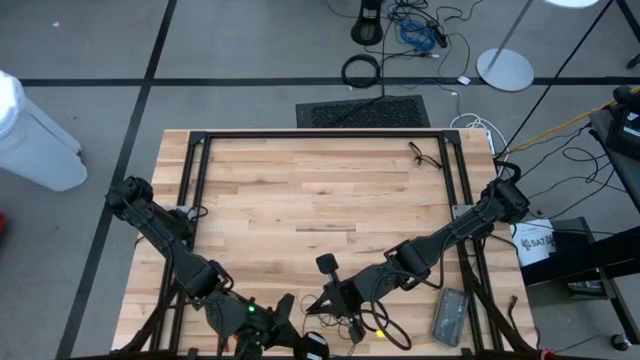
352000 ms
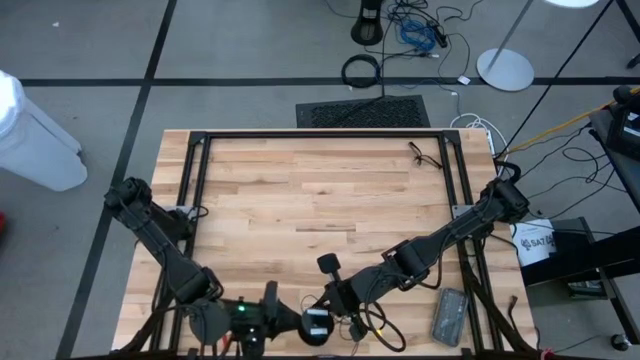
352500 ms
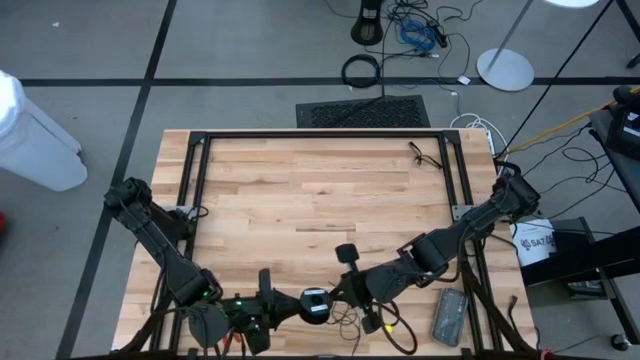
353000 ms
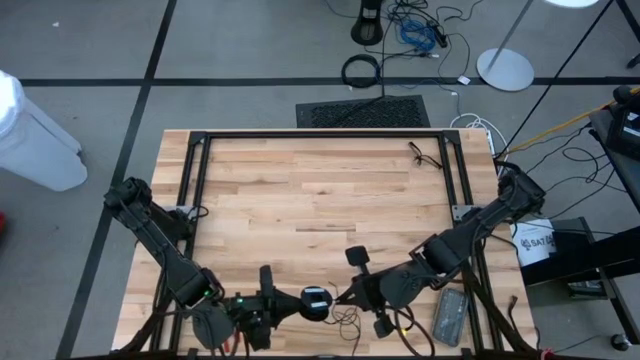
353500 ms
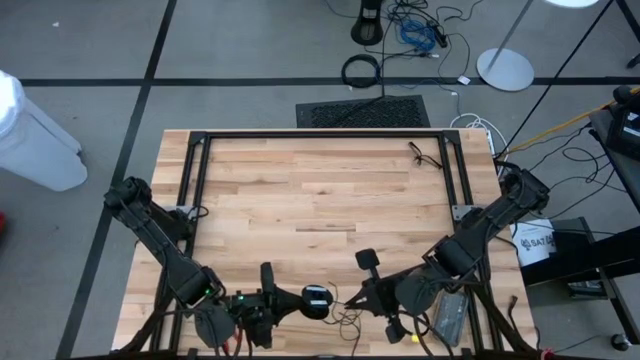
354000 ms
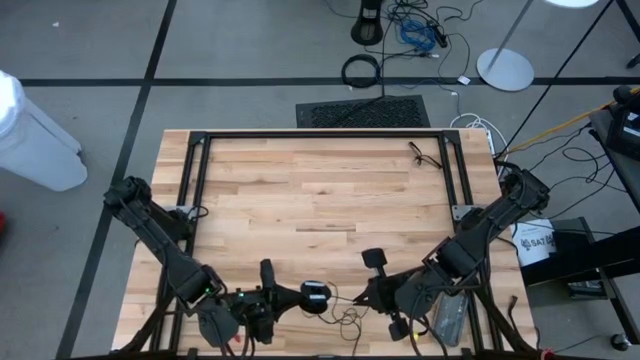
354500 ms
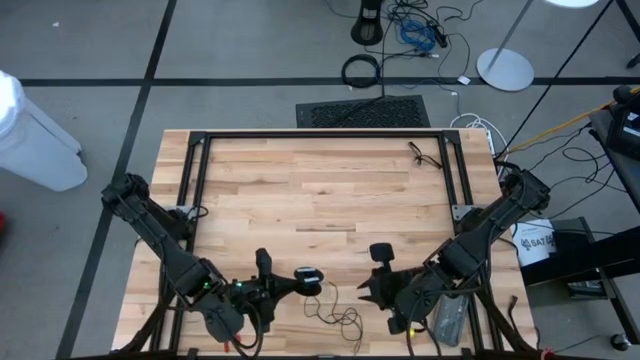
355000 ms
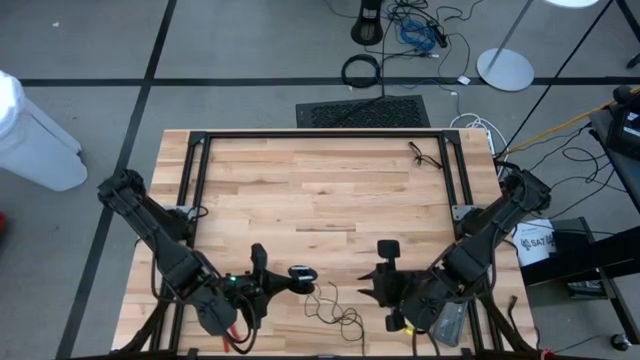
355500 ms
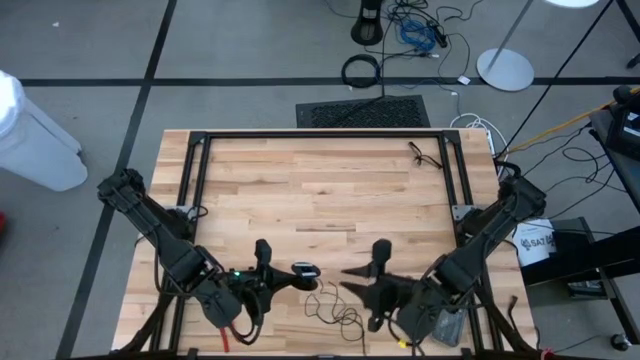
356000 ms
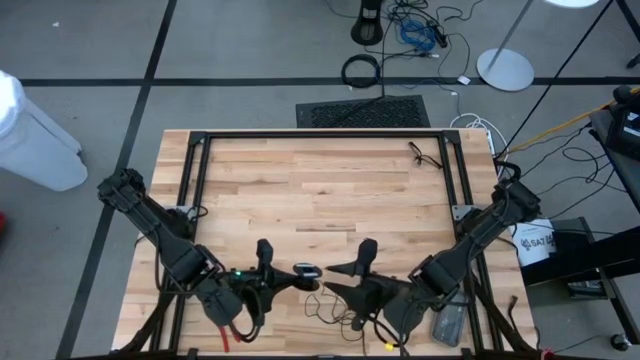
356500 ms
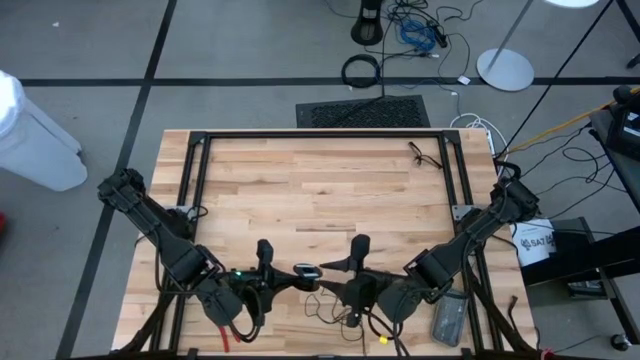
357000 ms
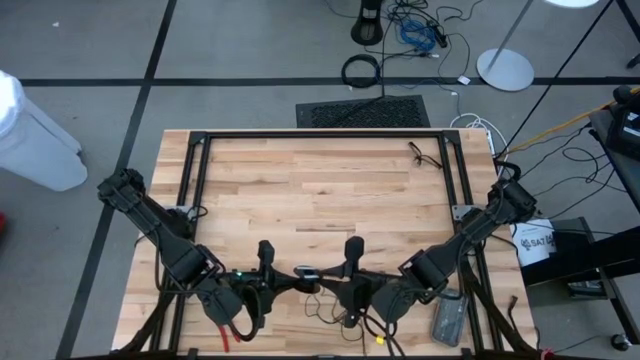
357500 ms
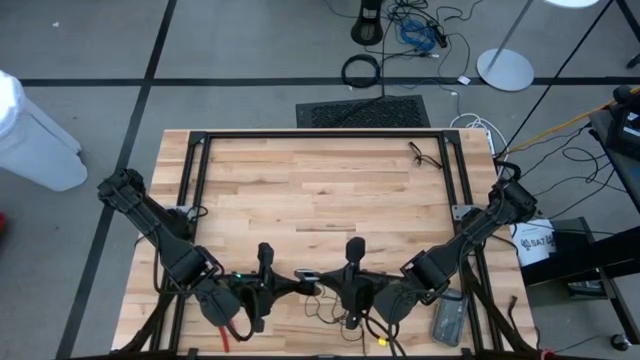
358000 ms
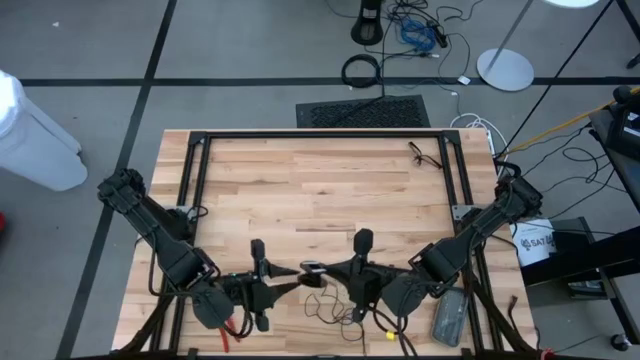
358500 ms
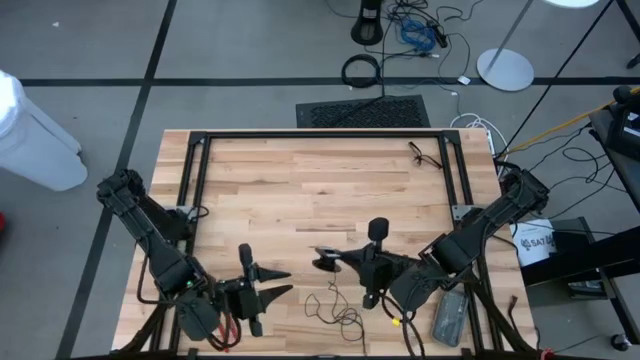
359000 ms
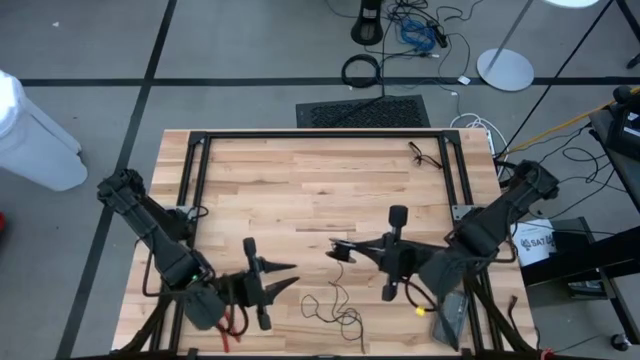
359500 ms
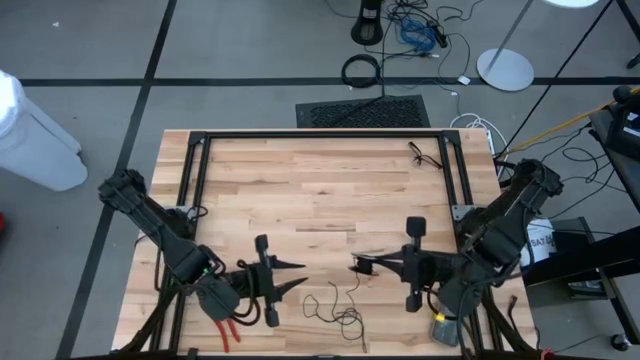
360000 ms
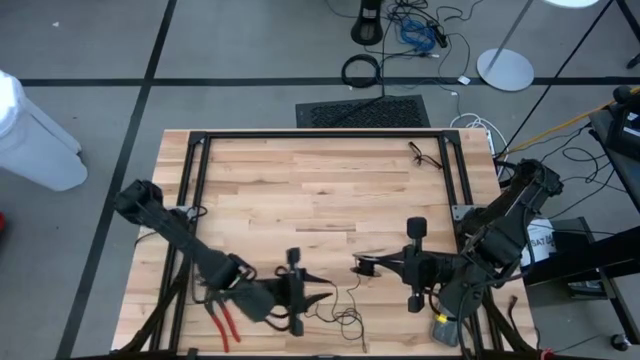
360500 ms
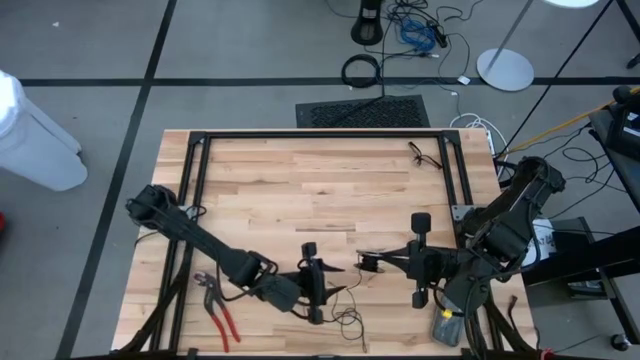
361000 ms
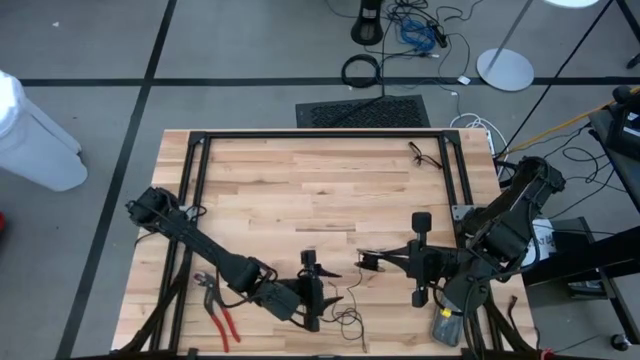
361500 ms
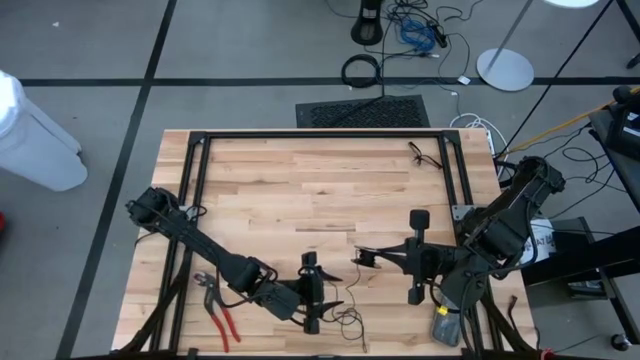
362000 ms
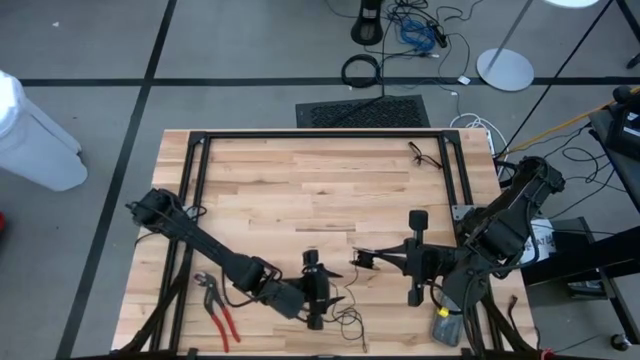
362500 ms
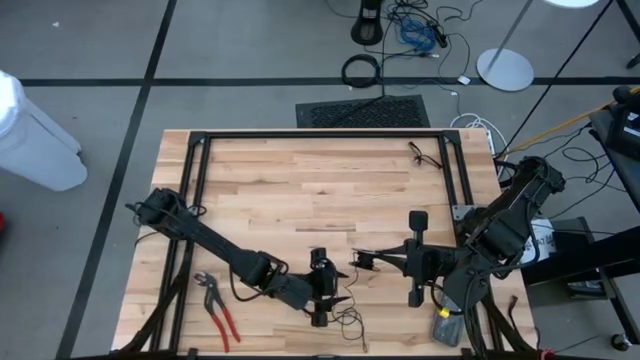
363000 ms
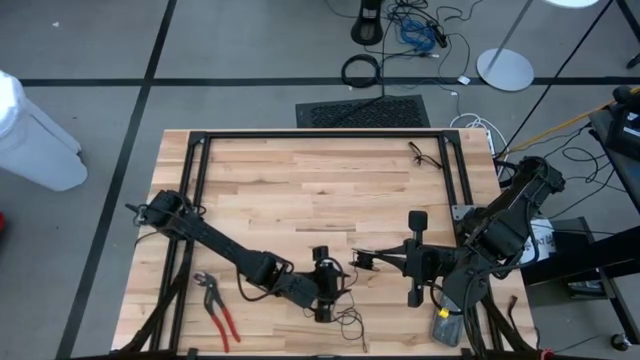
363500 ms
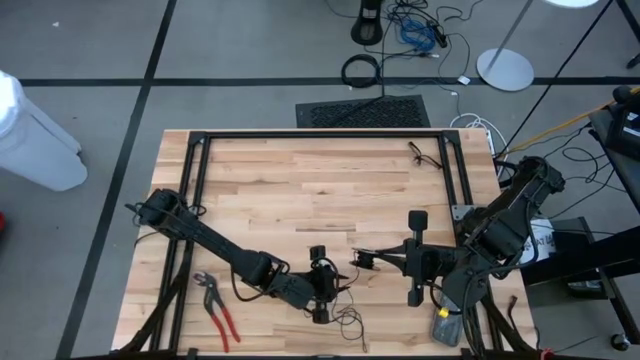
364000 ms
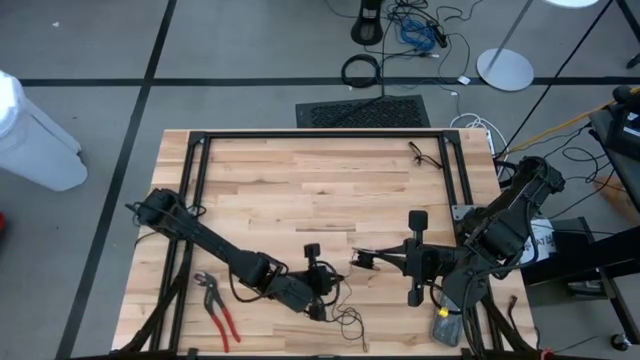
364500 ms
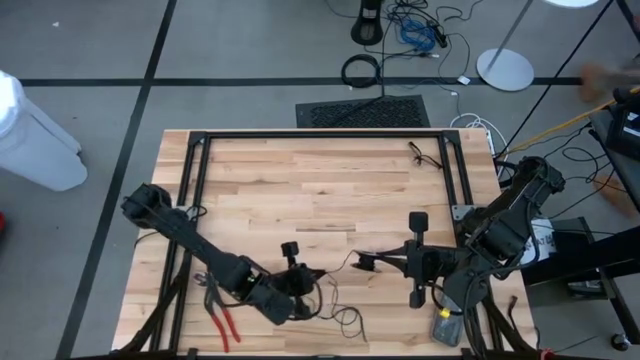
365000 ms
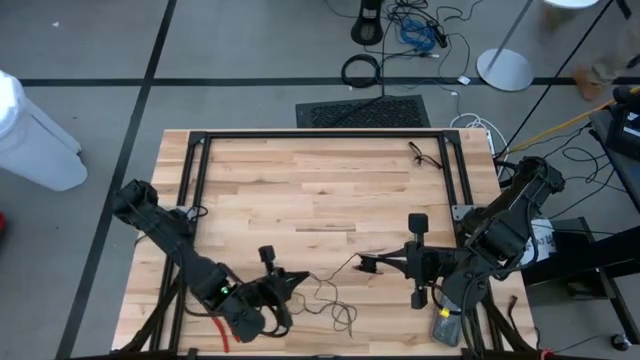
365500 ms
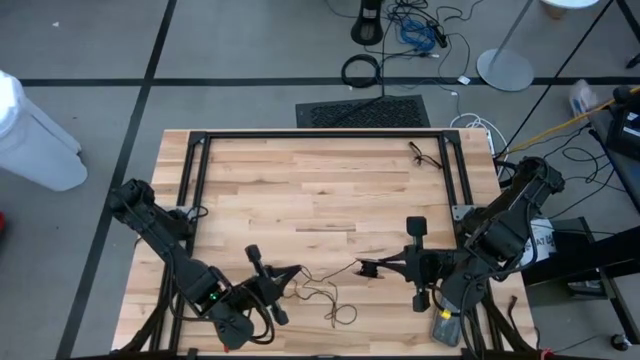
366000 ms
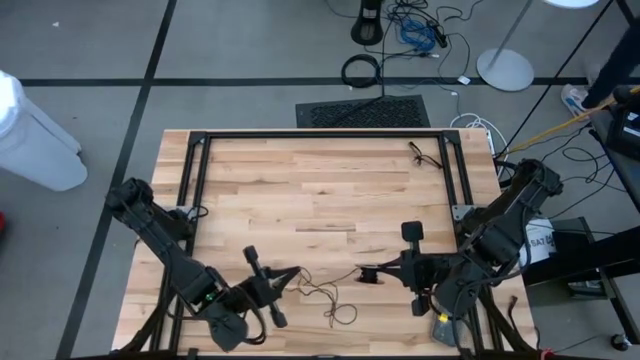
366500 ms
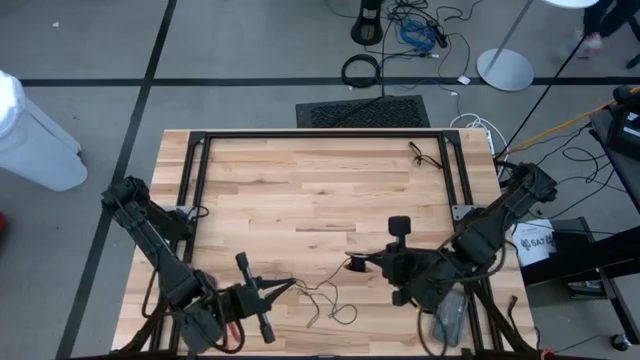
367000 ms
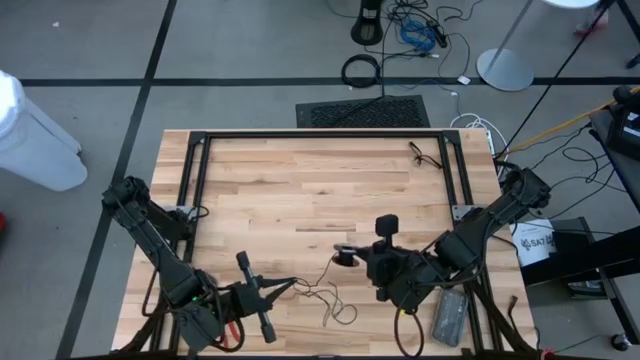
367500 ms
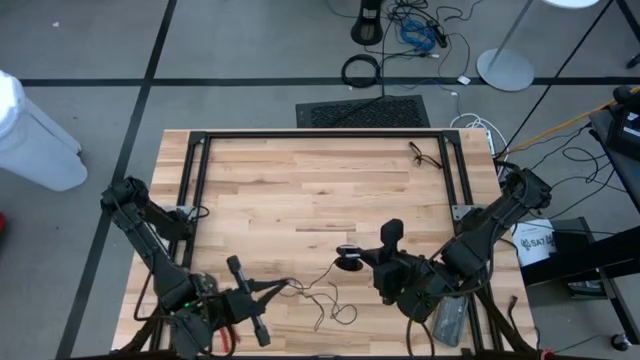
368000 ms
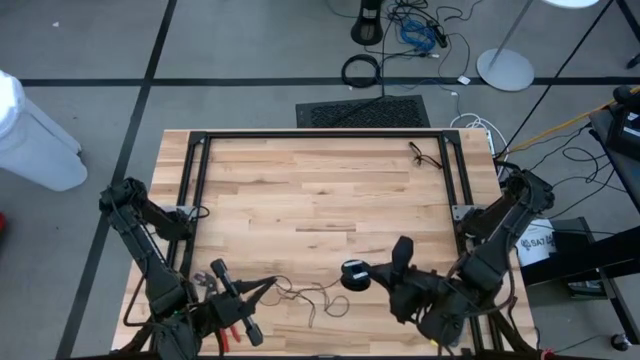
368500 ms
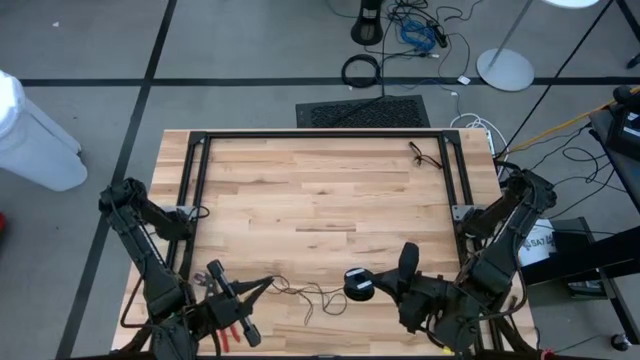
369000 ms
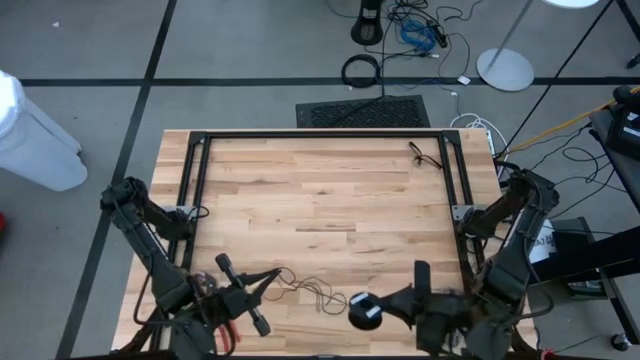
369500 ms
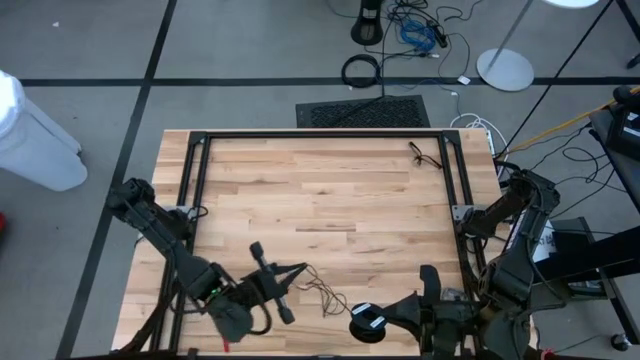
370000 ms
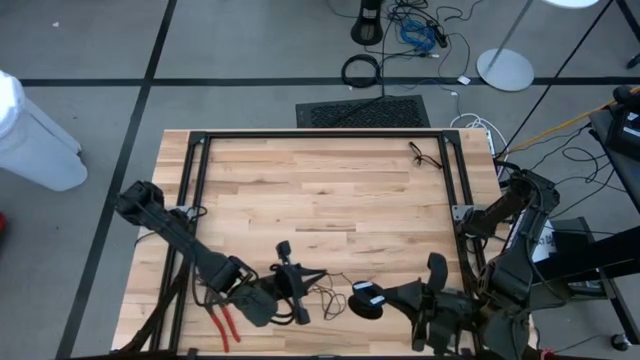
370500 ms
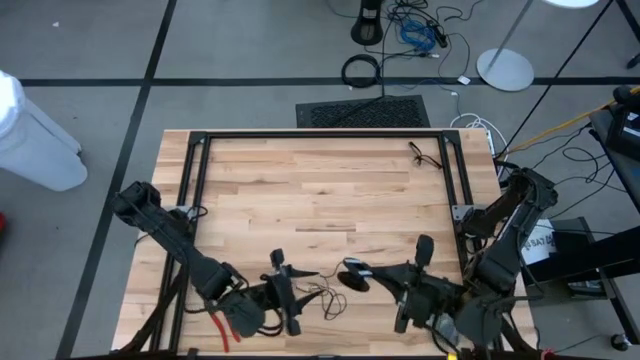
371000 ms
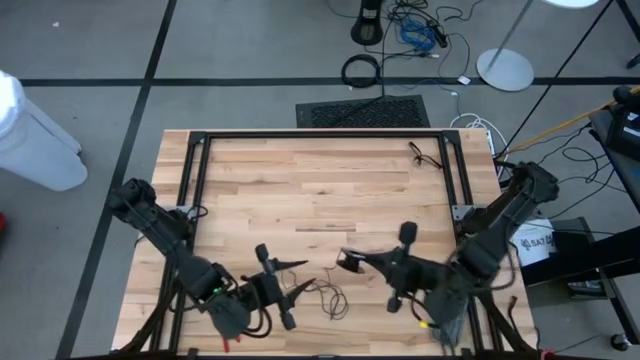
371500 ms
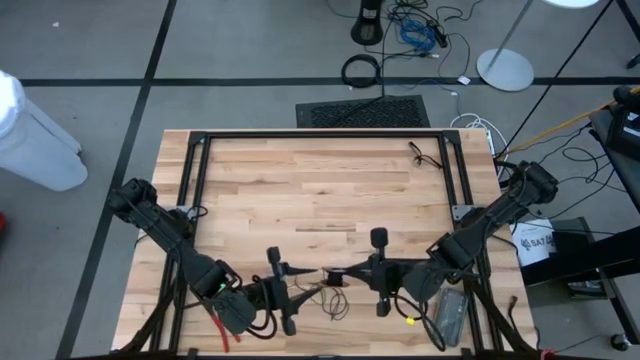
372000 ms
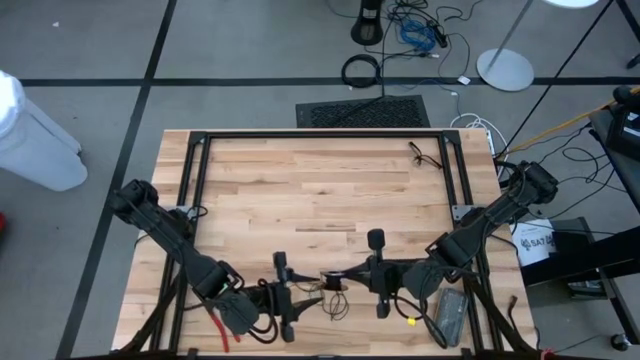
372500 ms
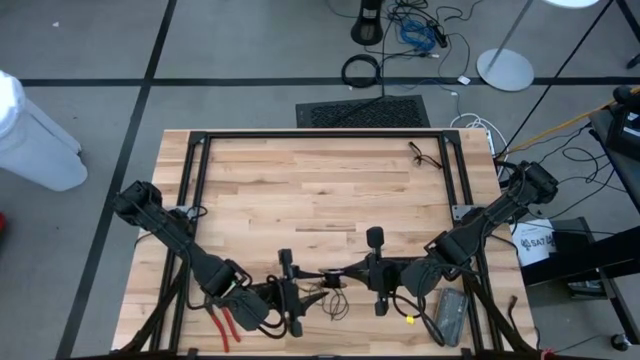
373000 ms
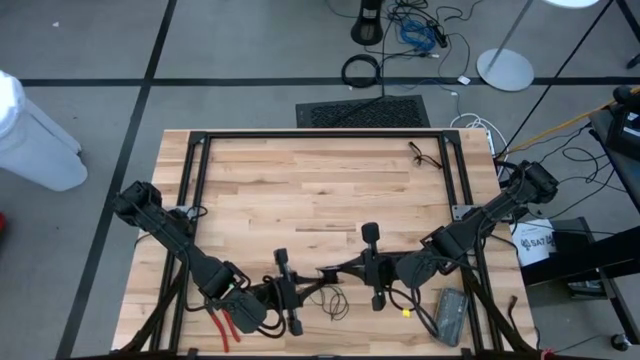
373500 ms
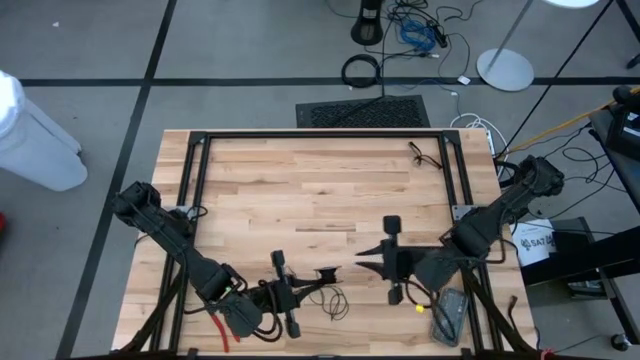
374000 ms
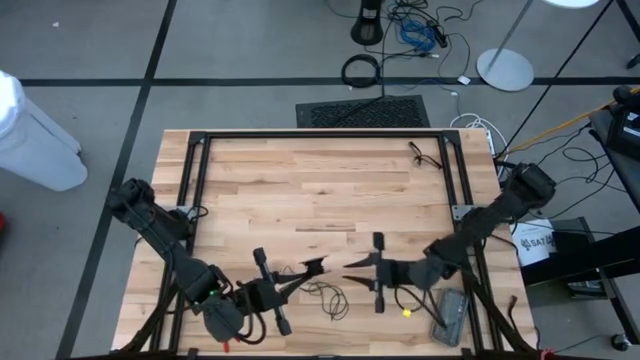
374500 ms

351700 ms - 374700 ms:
Task: Coil cords
Coil the black wire onto the black spool
